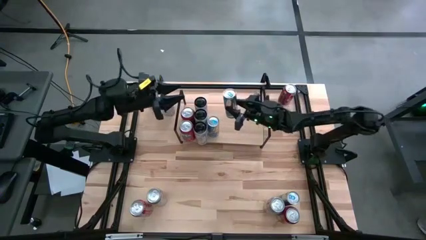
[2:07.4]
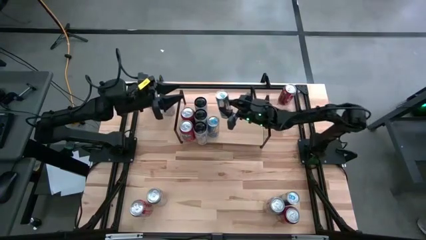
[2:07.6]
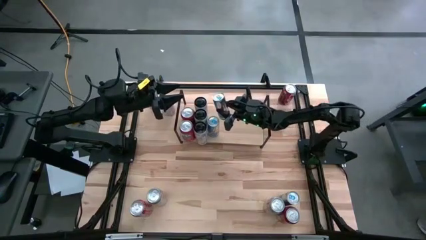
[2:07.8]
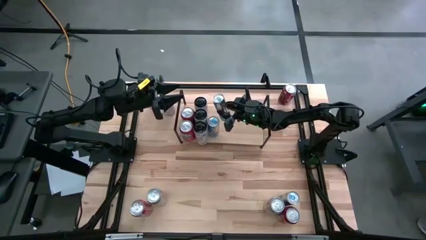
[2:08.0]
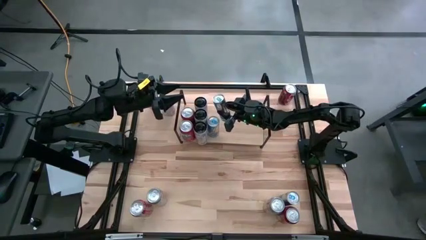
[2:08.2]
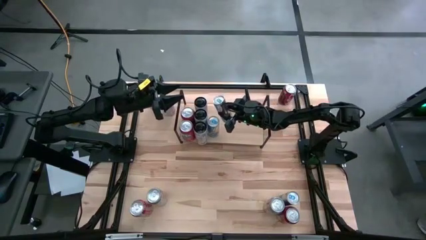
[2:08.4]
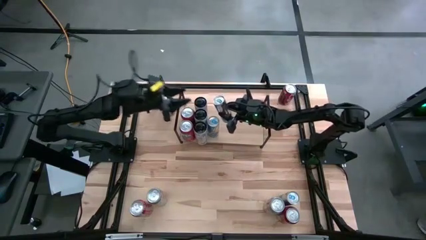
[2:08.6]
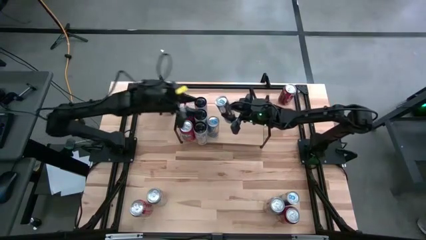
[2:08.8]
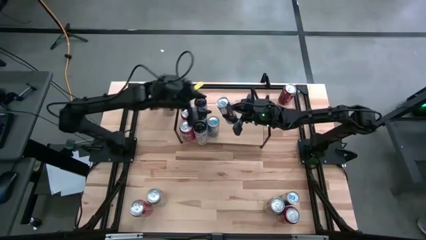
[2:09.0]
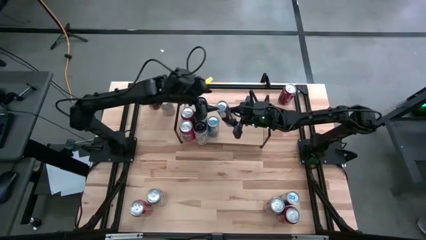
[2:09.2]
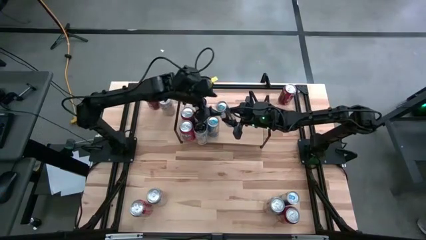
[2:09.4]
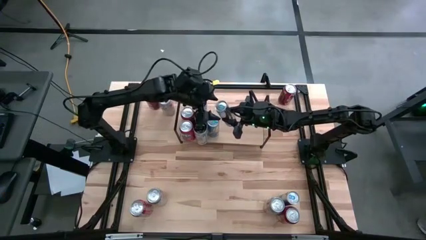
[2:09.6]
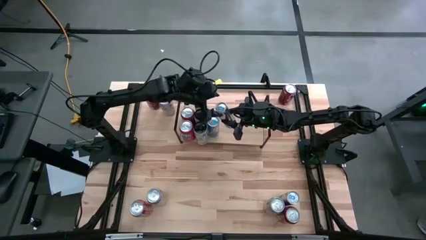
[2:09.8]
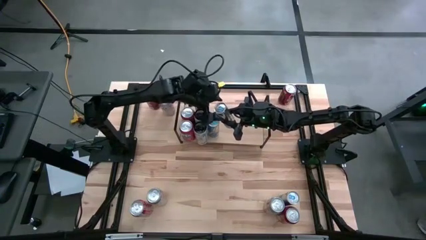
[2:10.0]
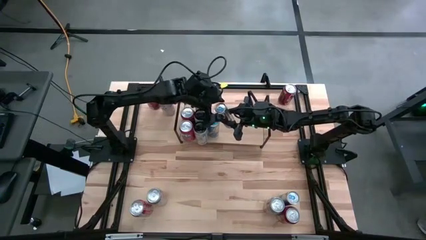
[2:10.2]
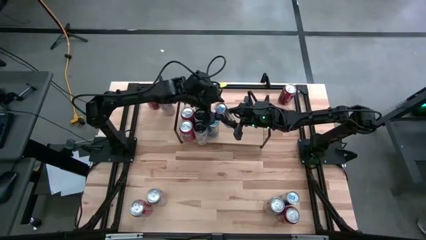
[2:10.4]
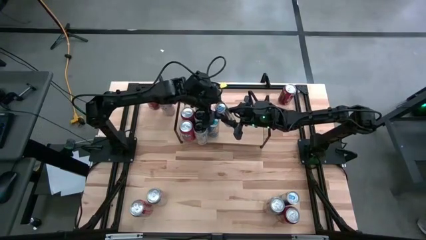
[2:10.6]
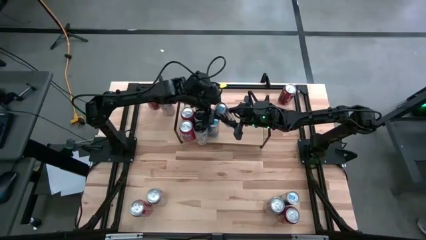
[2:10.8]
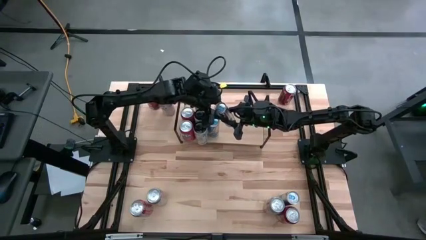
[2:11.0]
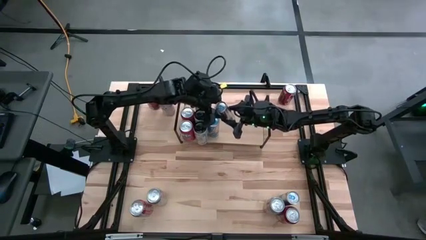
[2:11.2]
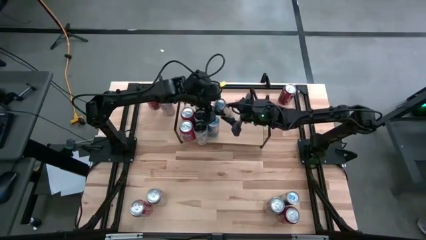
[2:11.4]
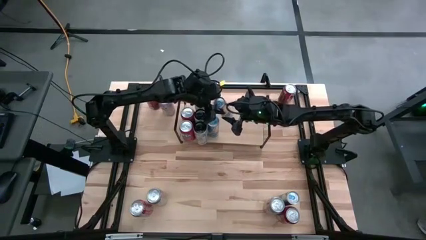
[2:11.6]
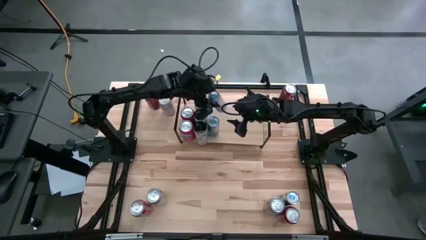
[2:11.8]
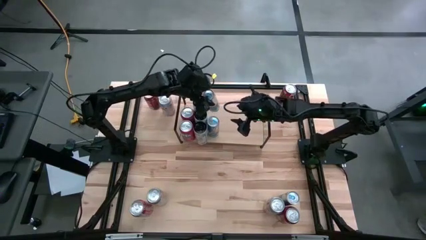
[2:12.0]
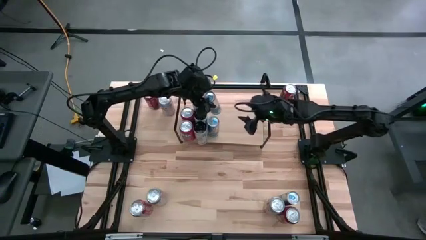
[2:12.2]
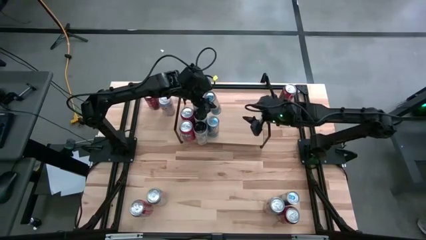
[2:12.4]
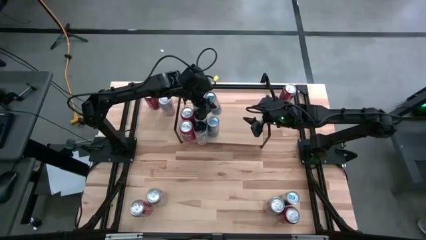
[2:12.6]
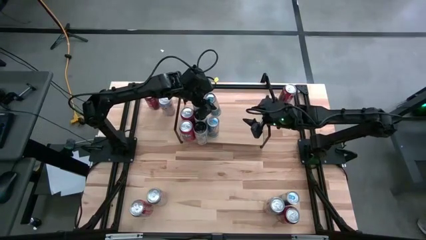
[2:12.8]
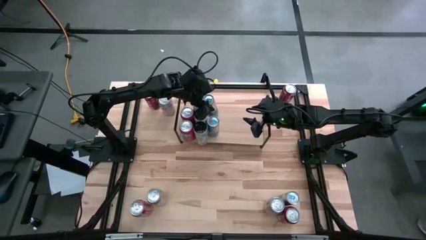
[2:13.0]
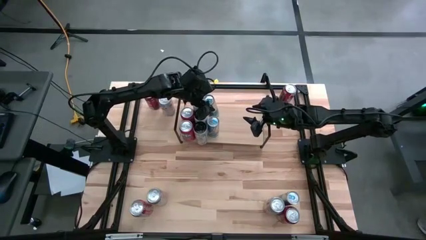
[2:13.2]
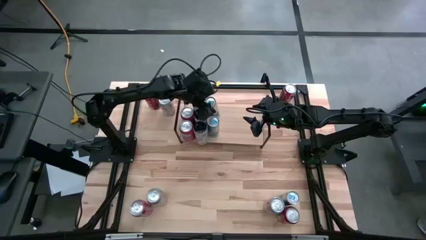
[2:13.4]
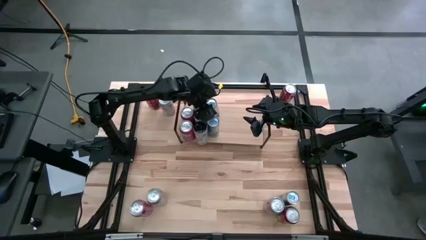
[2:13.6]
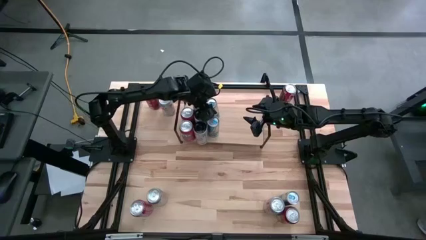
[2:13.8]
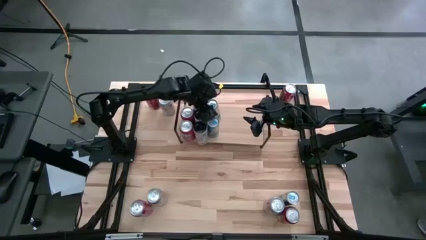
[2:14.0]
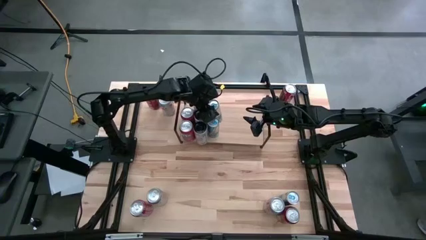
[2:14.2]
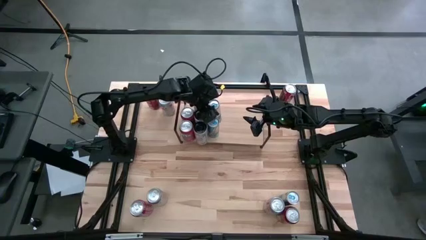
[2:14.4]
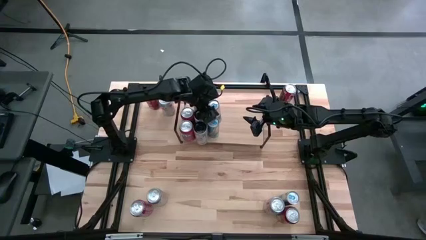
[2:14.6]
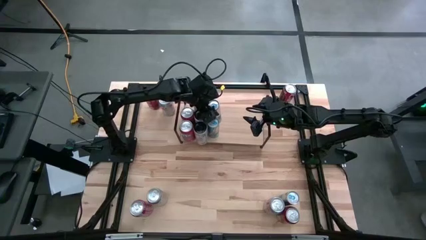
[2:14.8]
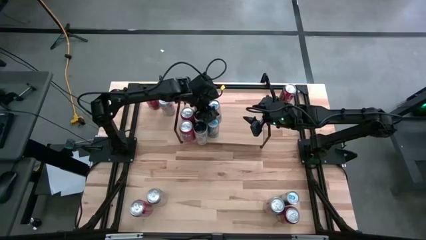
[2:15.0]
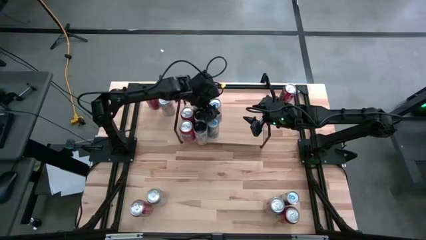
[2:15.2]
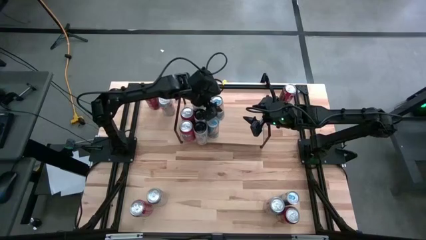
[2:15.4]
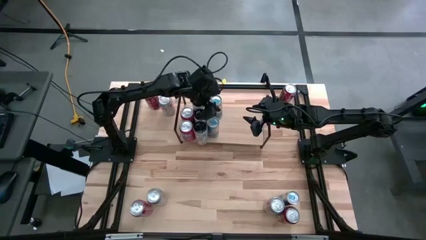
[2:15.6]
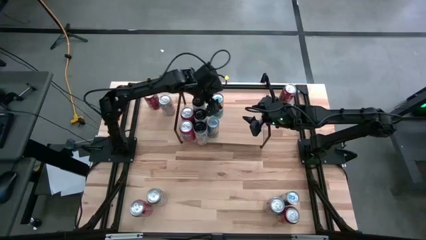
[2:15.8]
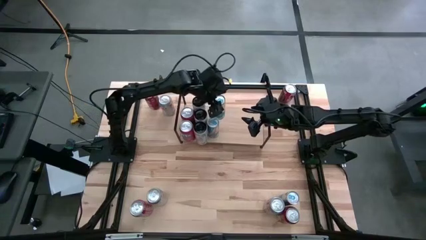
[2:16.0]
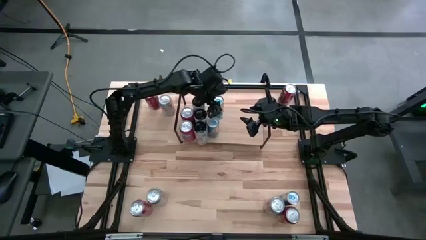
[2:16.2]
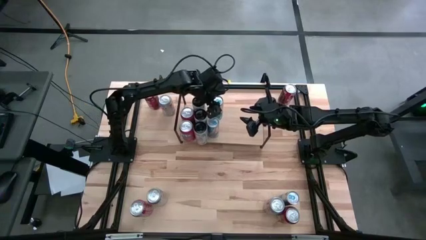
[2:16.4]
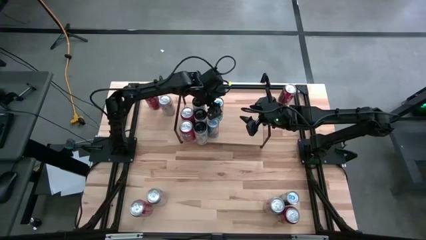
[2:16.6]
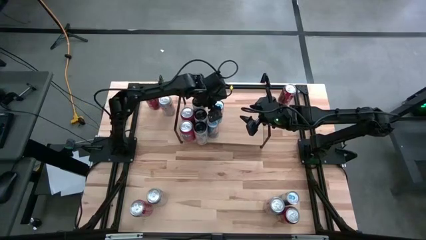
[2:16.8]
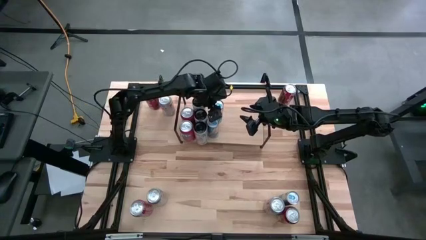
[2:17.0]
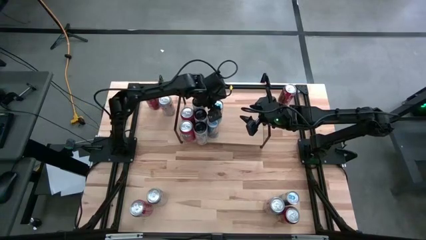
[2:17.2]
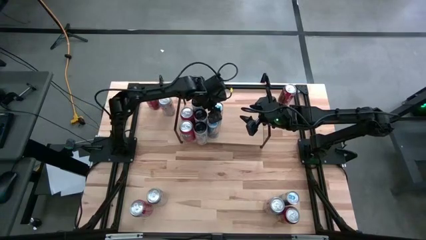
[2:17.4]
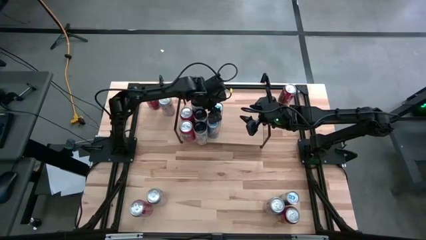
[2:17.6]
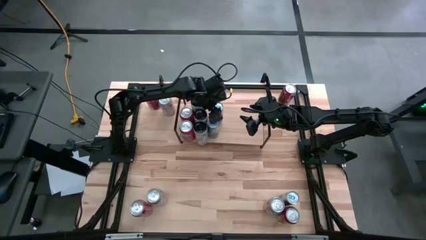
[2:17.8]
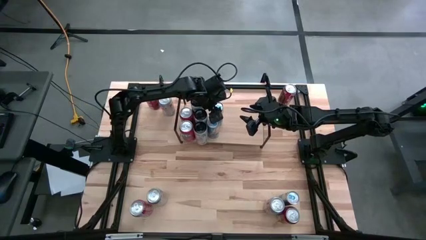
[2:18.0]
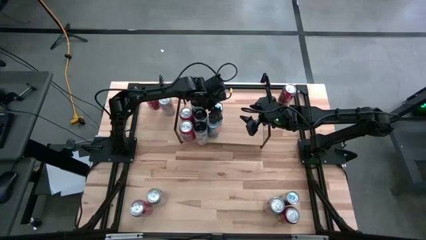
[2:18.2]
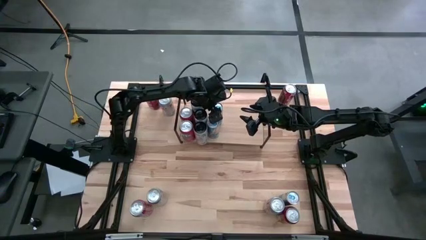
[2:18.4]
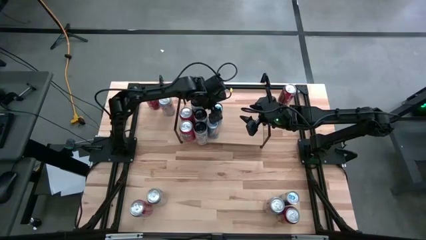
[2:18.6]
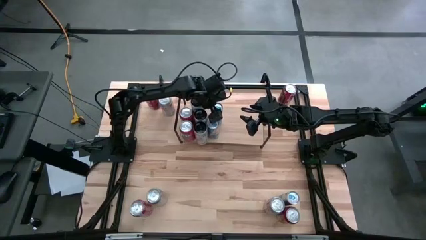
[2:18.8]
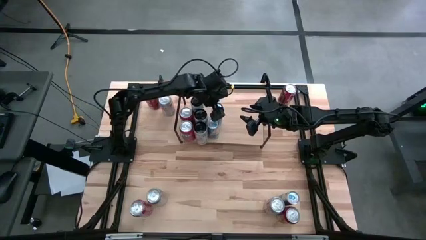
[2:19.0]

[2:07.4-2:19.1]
Task: Place canned beverage on shelf
Put the left blue soda can on the shelf aligned with the other blue soda can

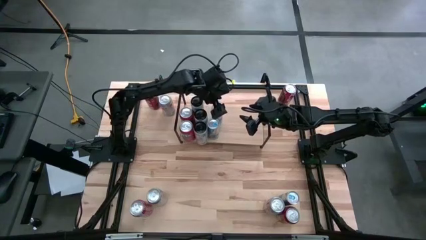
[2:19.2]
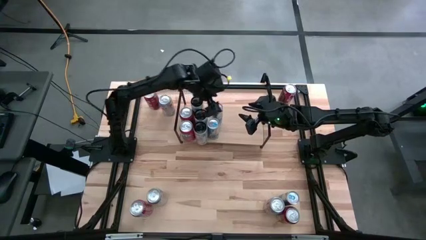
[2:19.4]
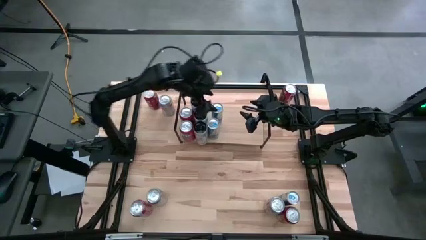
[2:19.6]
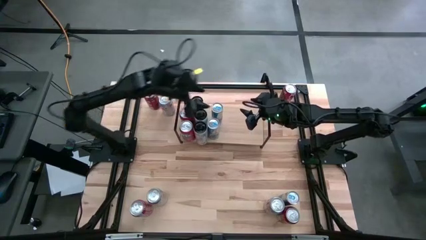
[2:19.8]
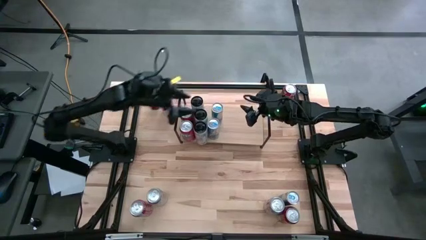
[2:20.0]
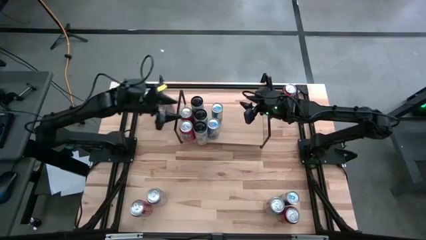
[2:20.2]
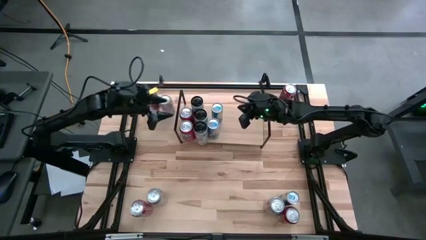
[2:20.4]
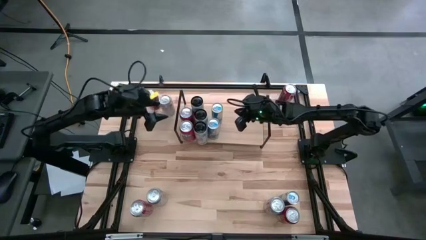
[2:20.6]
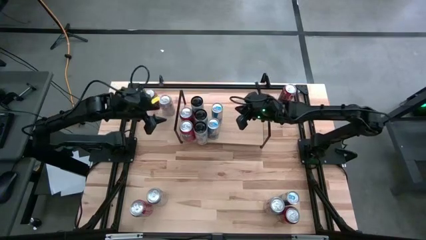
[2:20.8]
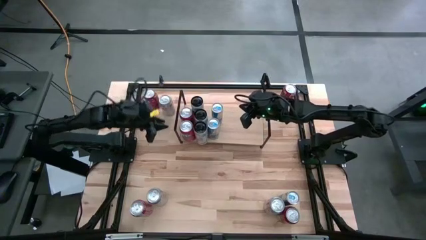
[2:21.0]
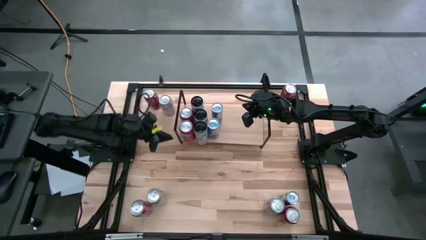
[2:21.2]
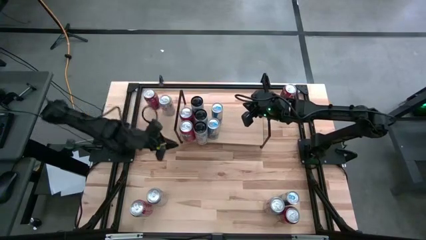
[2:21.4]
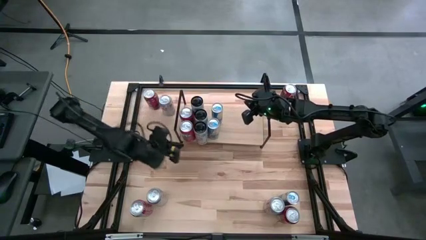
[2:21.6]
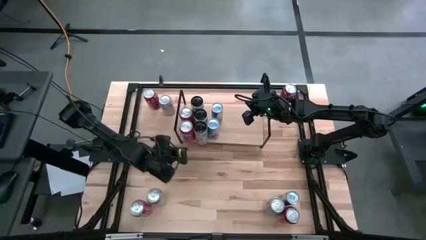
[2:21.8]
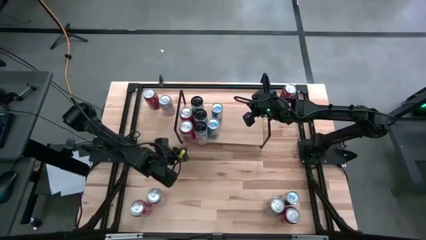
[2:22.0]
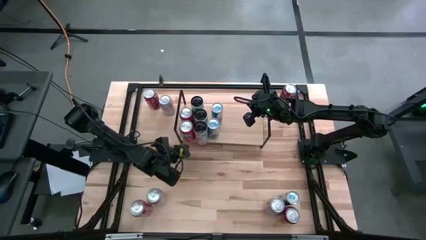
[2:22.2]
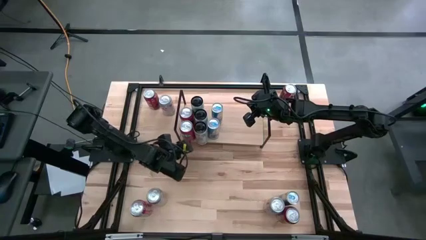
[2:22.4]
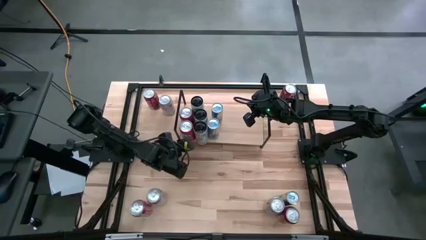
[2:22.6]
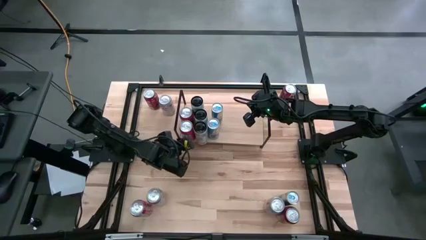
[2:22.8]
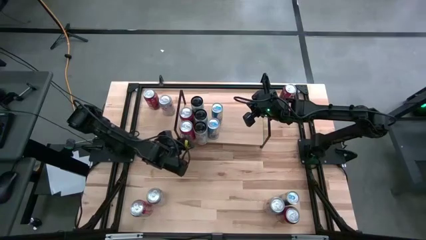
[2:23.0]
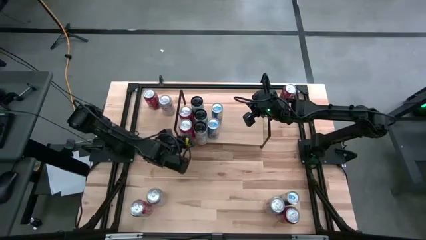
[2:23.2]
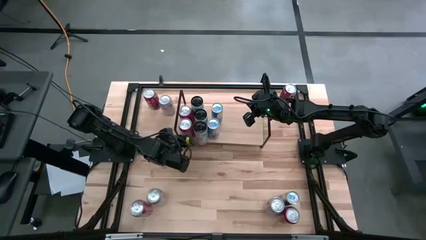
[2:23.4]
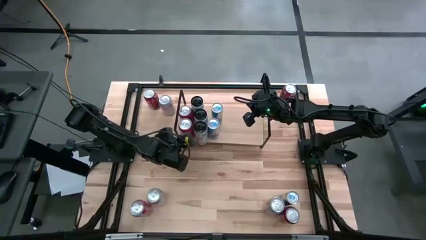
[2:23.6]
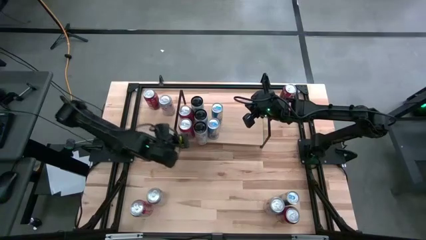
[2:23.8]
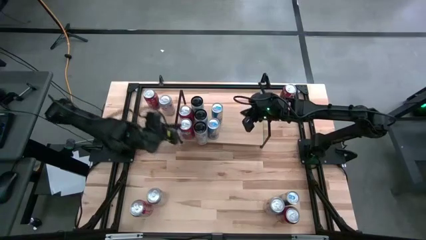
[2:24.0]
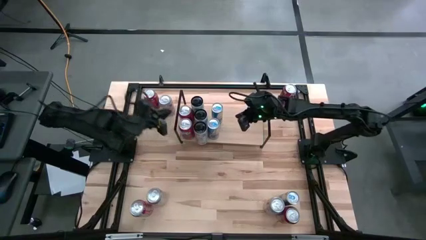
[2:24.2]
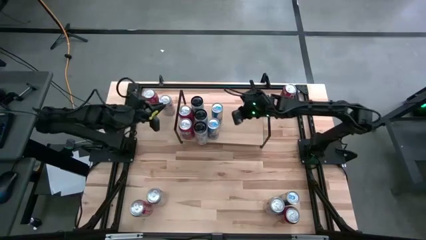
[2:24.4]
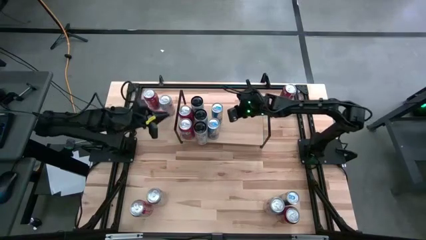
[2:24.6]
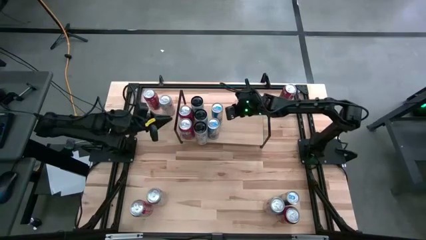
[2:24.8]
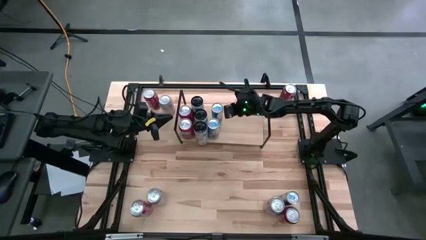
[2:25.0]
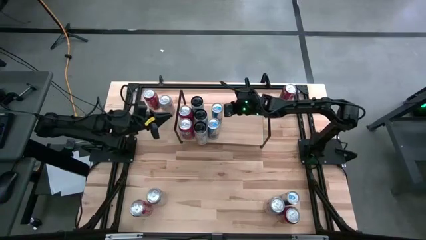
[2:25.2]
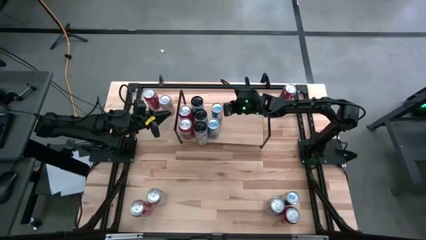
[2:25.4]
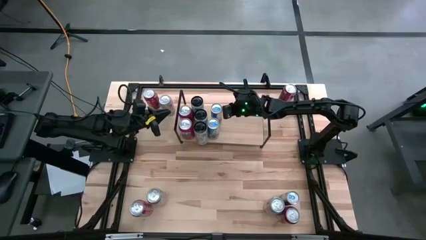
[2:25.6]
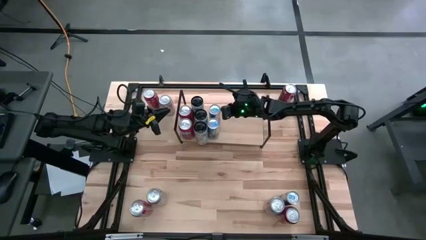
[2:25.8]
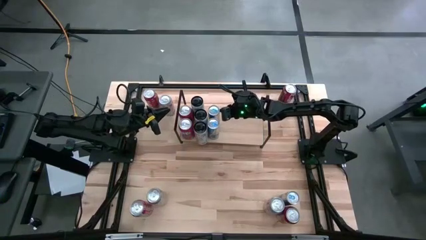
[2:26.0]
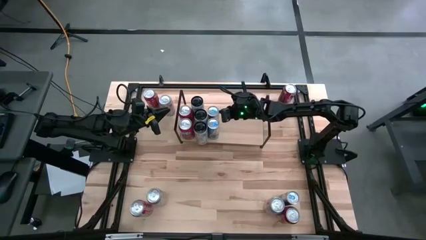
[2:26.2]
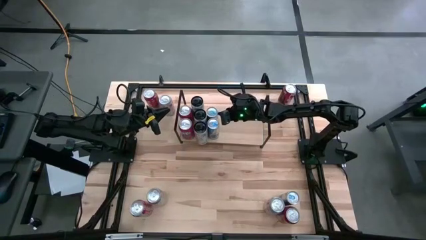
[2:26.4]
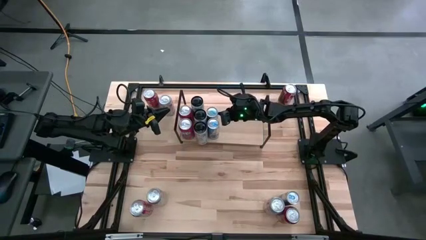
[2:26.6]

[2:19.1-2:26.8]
Adjust the soda cans on the shelf
